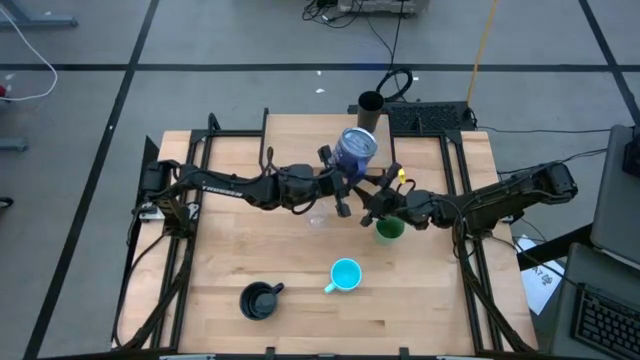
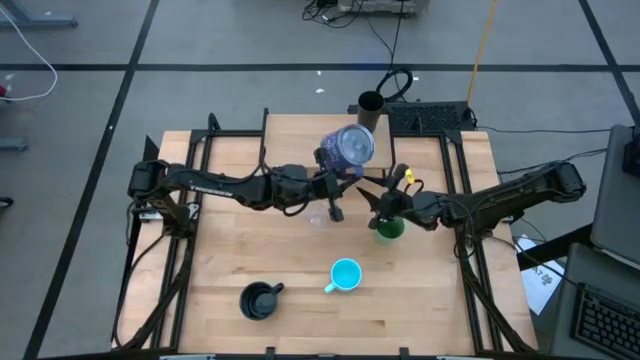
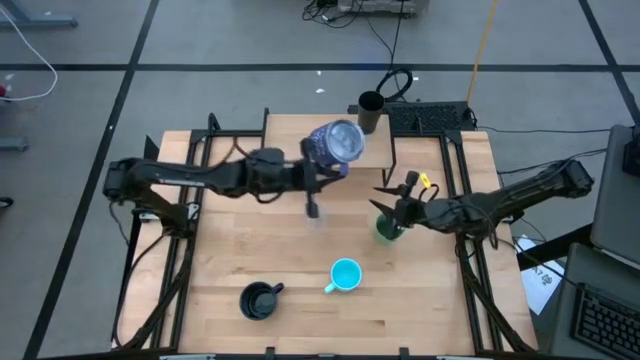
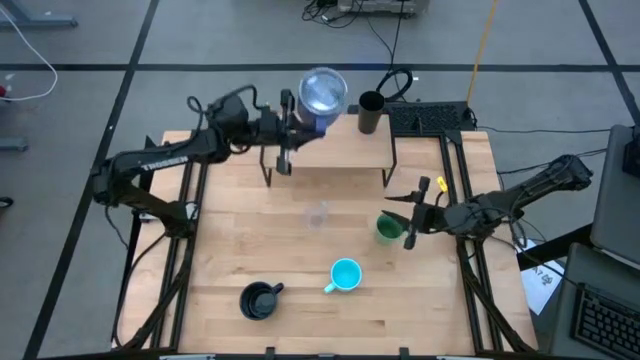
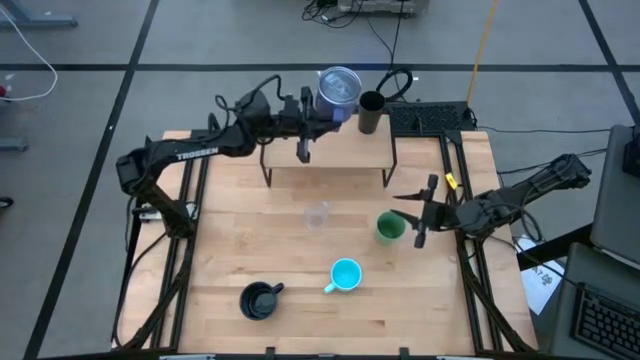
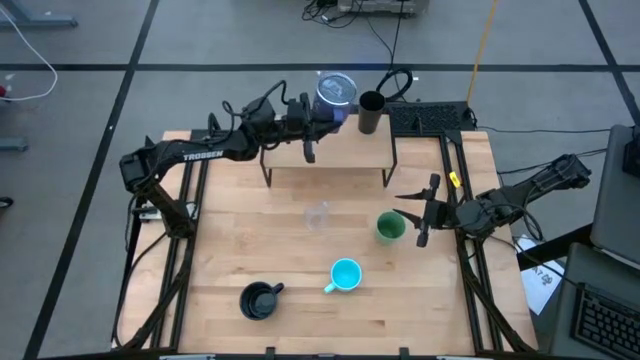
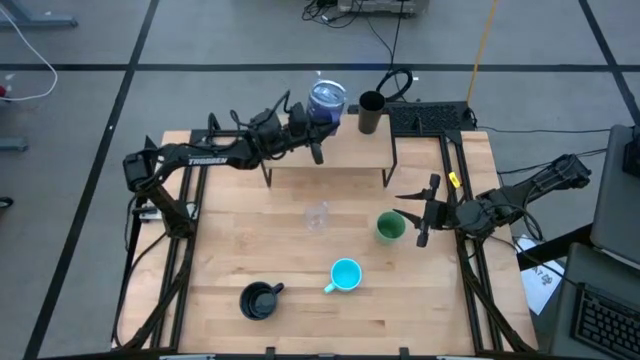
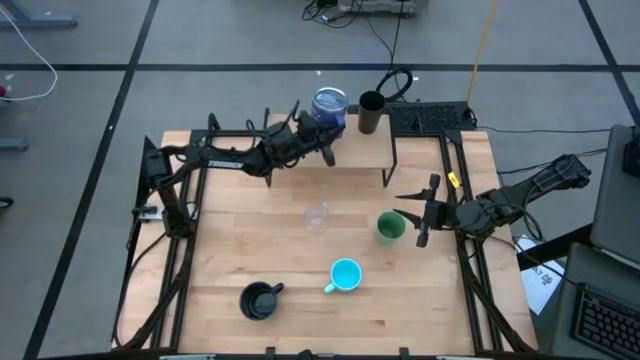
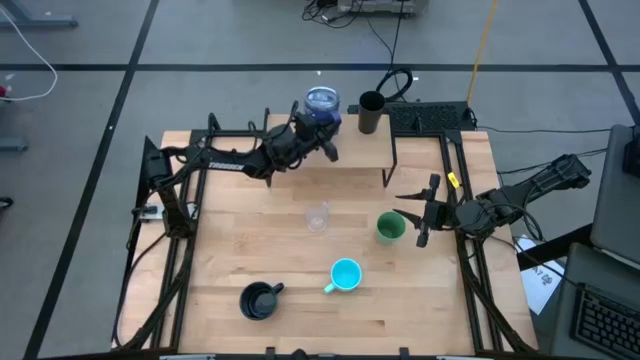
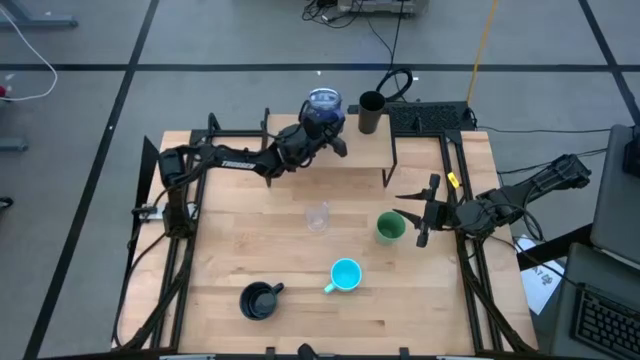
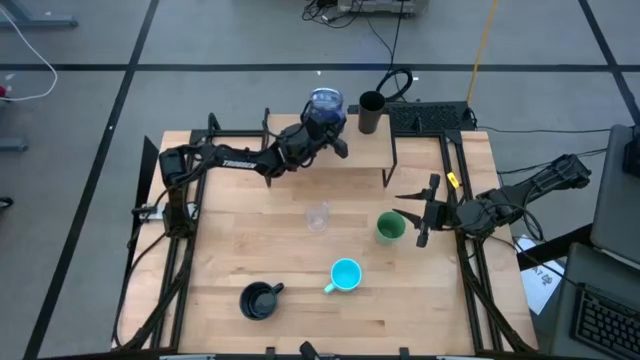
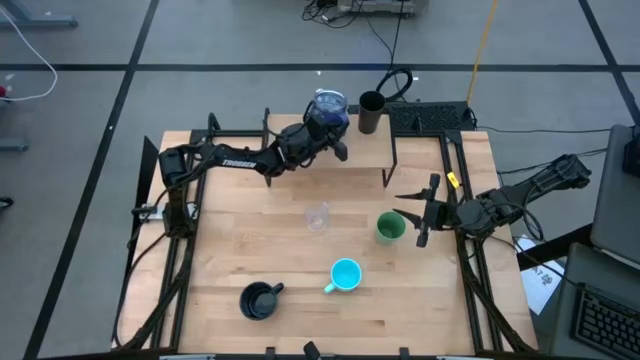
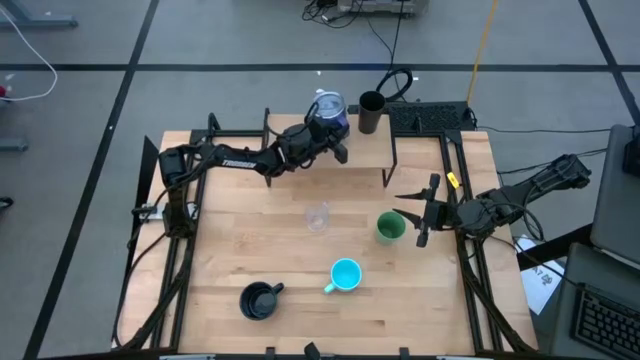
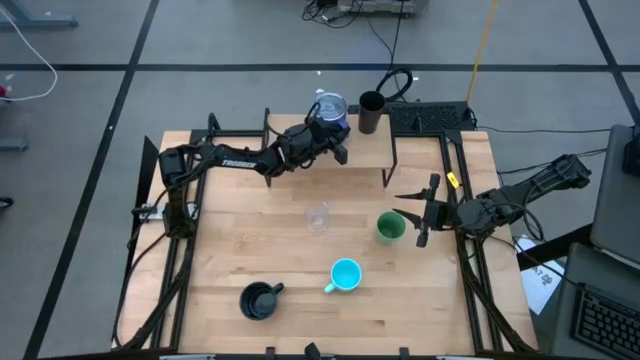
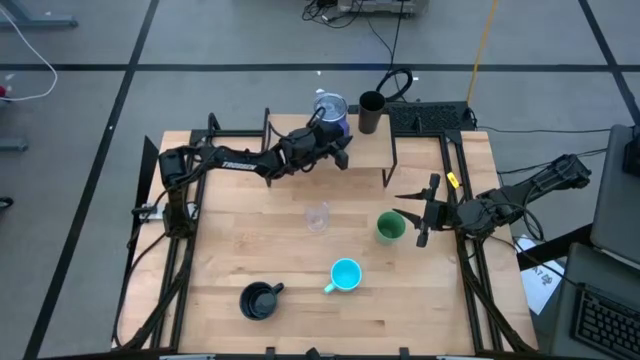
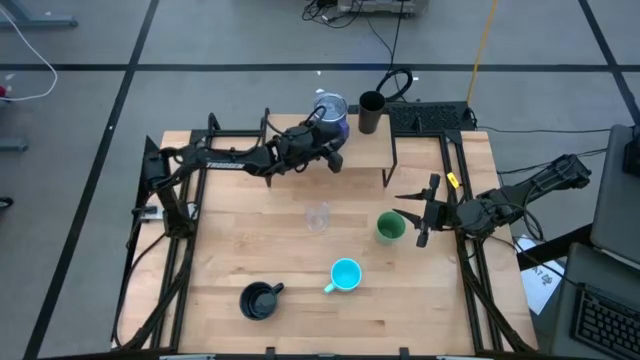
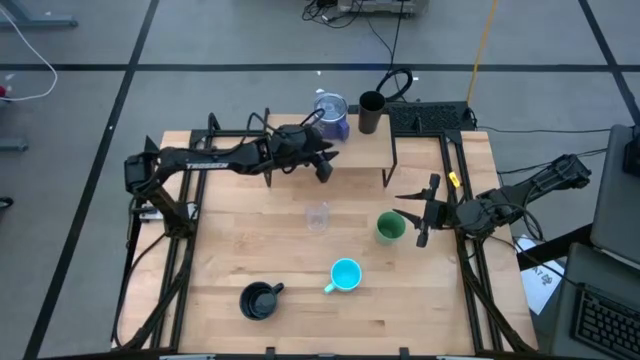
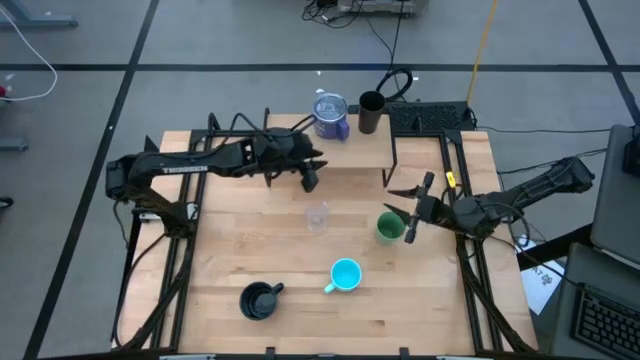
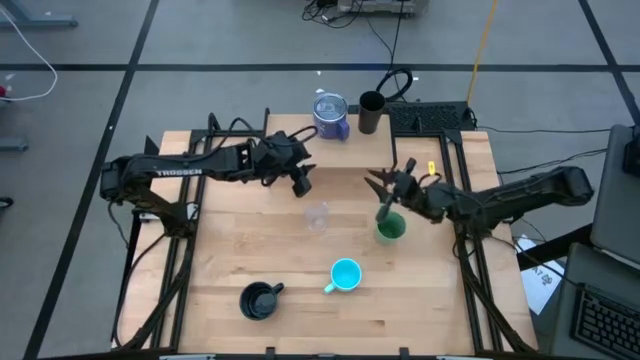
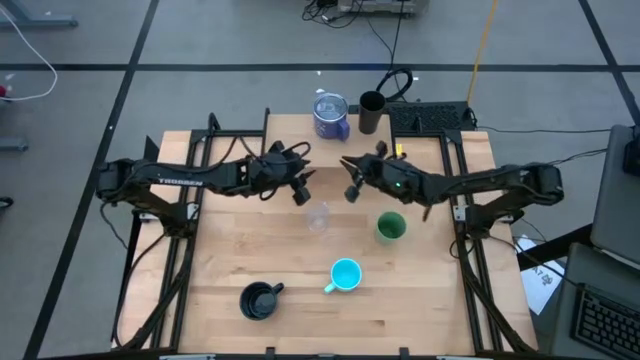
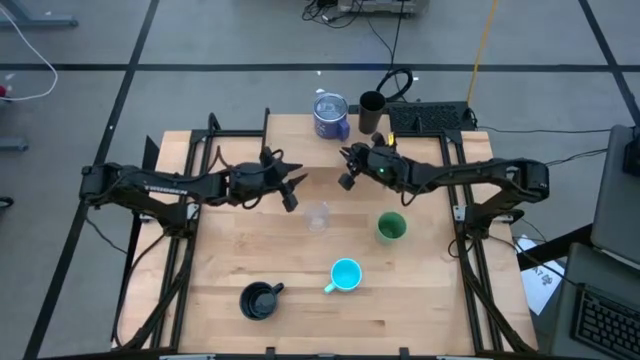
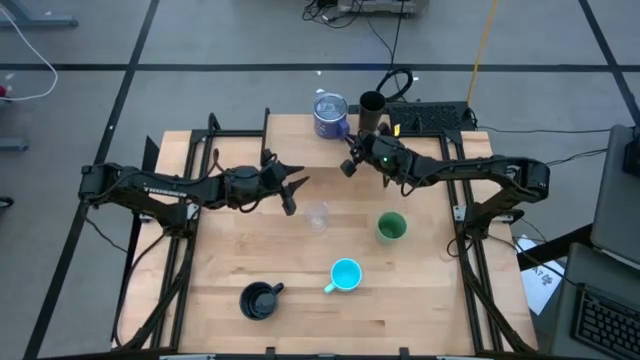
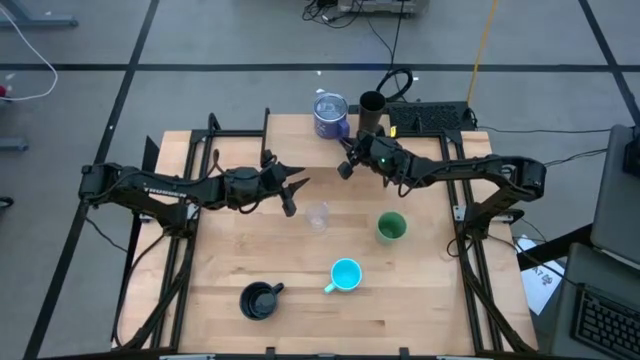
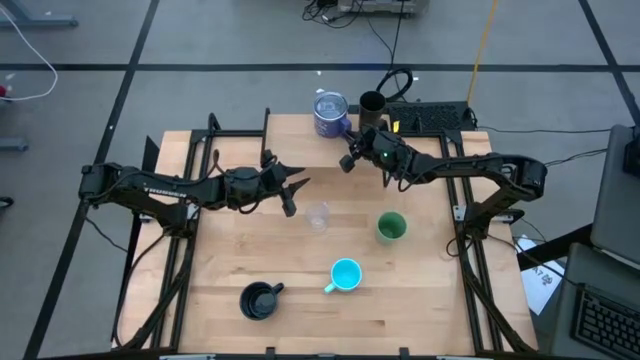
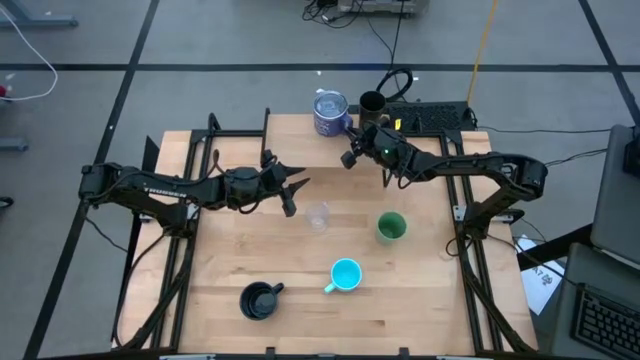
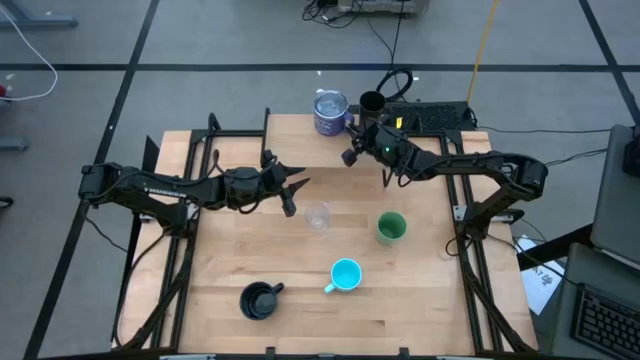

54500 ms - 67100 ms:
Task: Stack small to large cups/mugs on shelf
Put the blue mug on the shelf

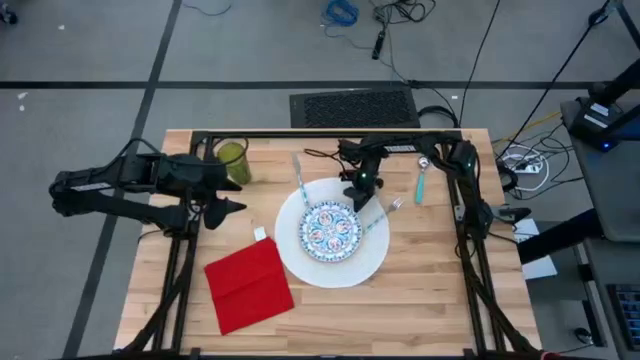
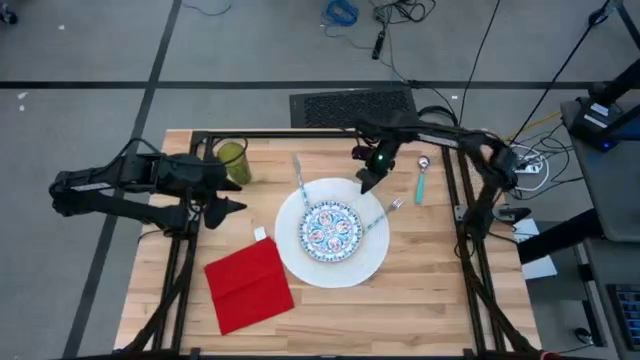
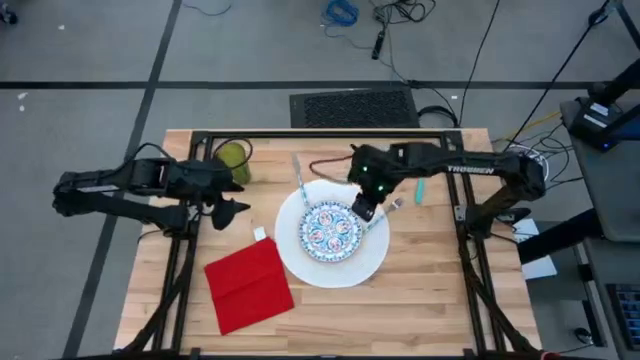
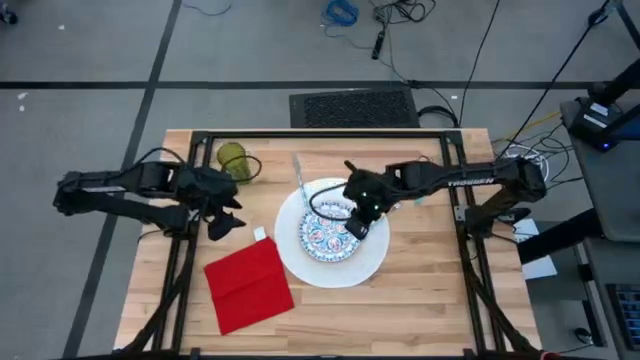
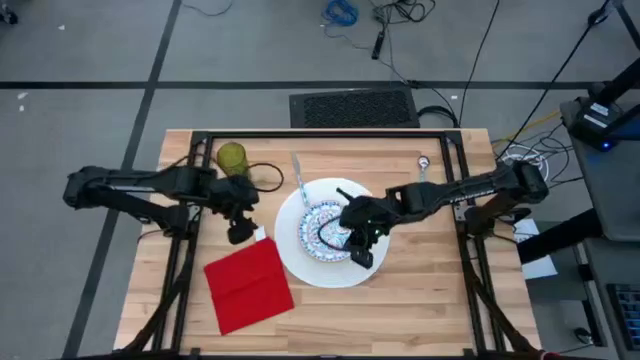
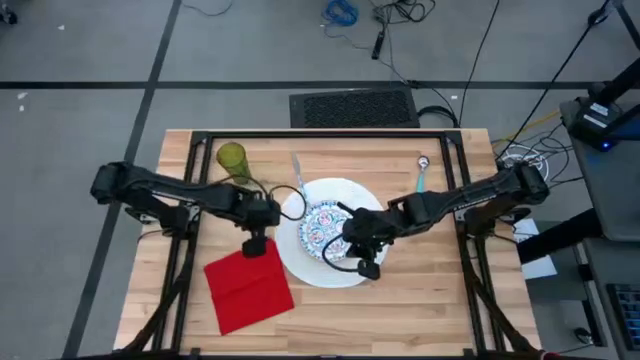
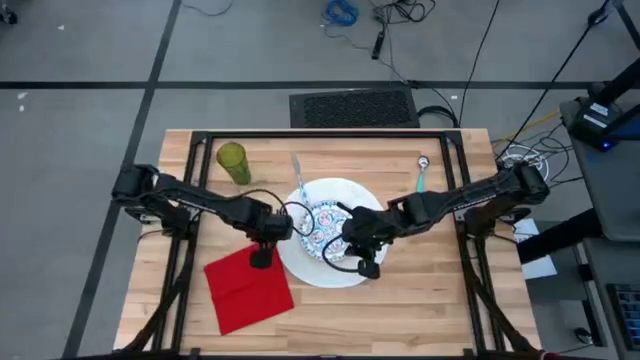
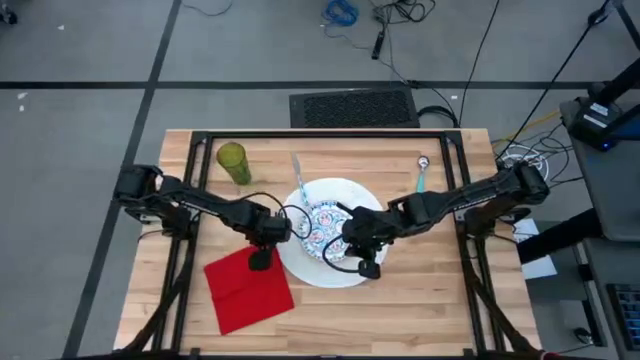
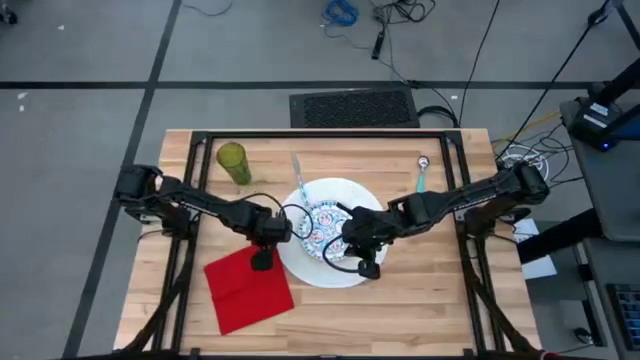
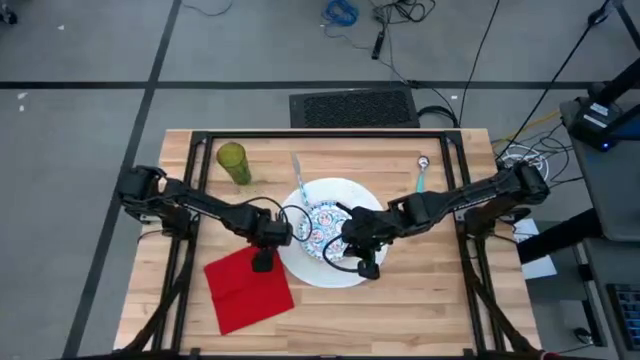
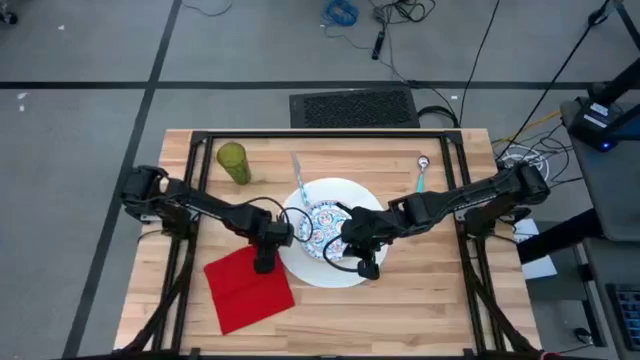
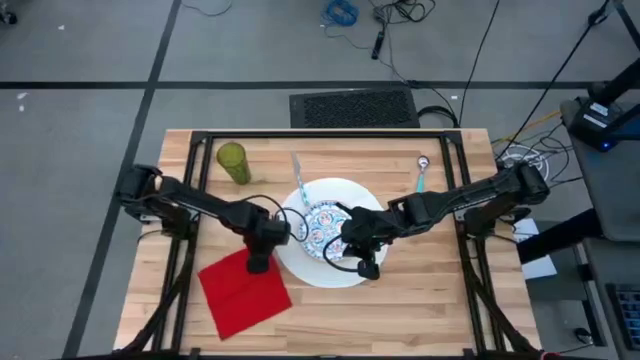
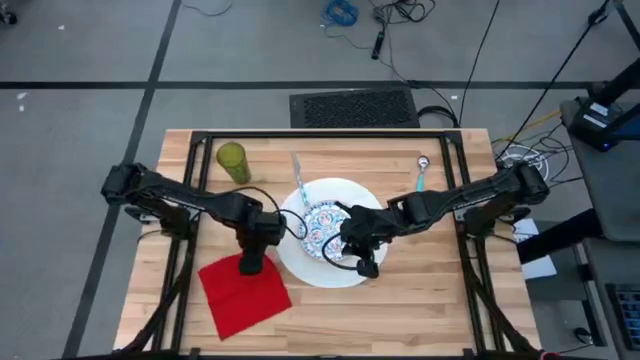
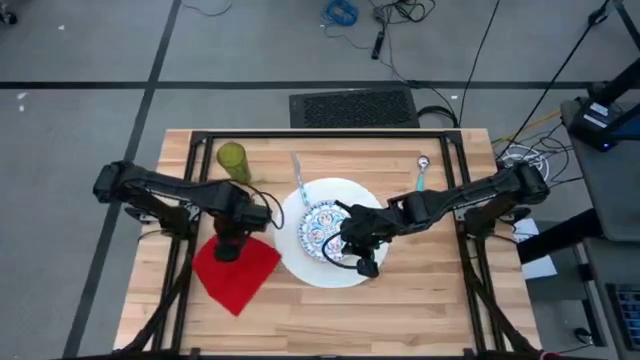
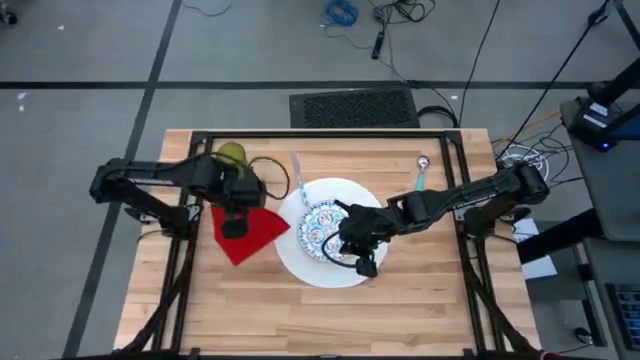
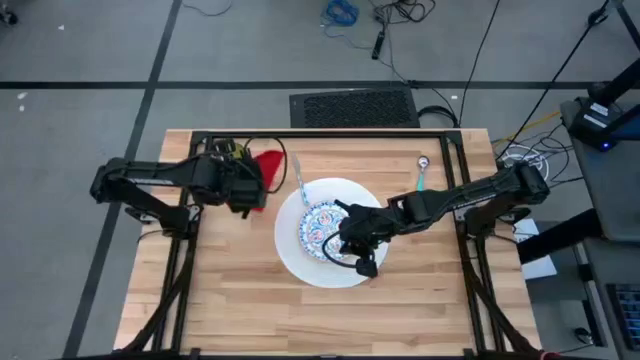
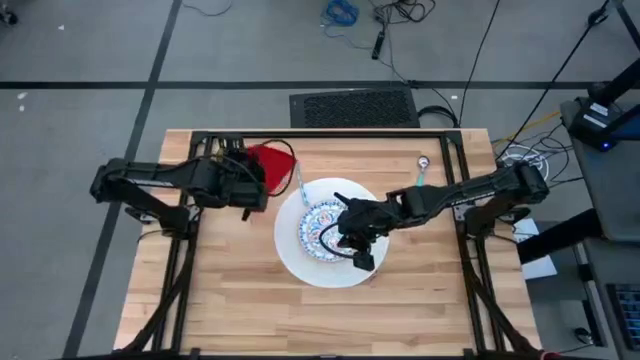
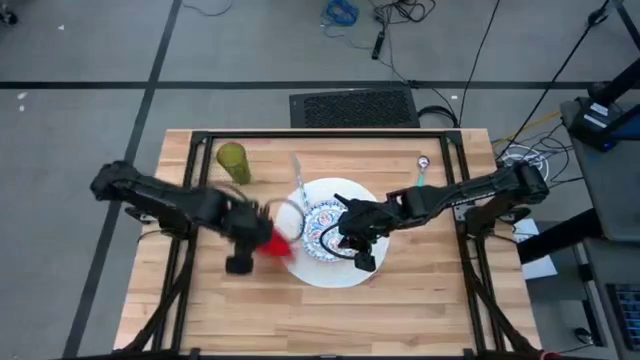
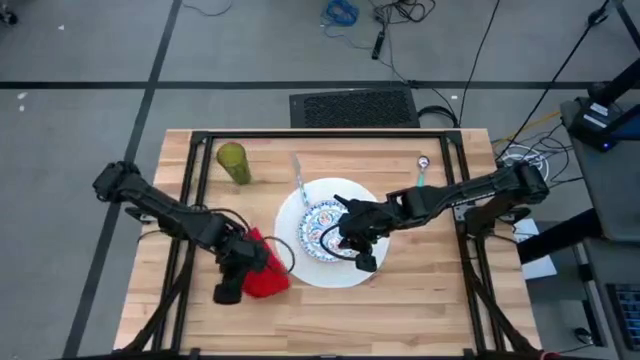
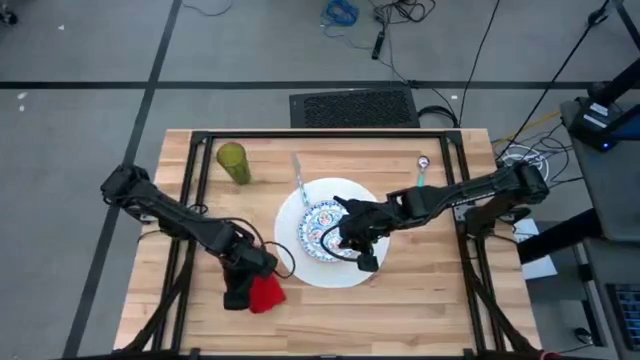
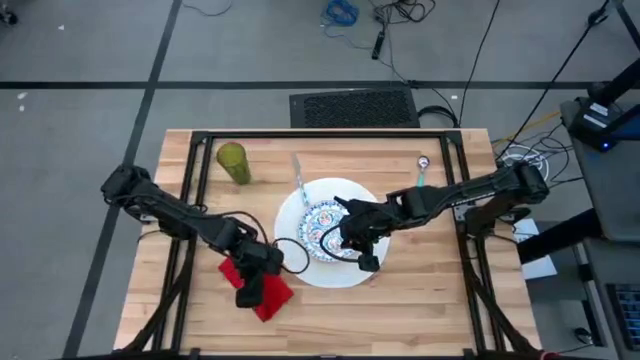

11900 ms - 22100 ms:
Task: Set table place
Fold the red table napkin
